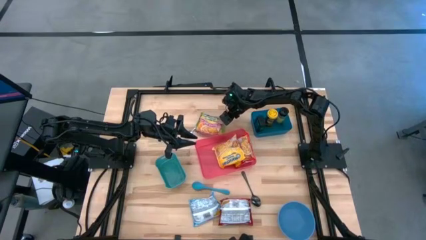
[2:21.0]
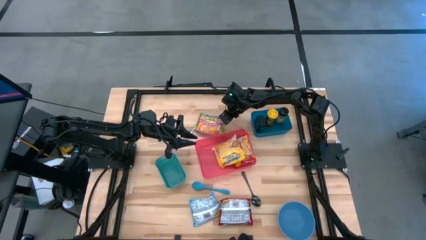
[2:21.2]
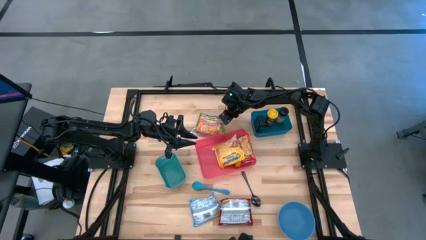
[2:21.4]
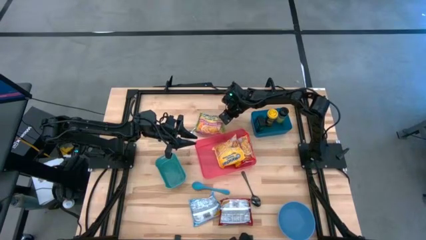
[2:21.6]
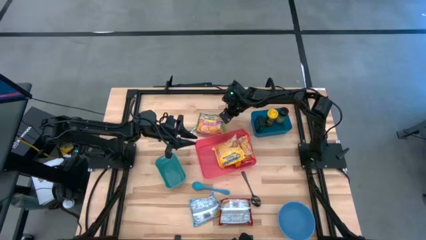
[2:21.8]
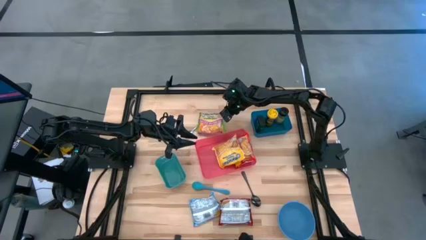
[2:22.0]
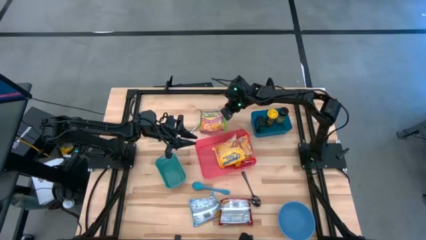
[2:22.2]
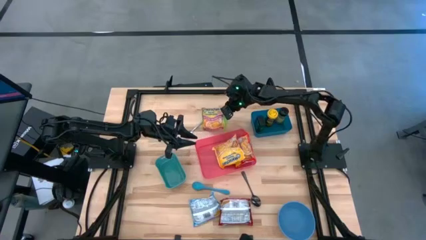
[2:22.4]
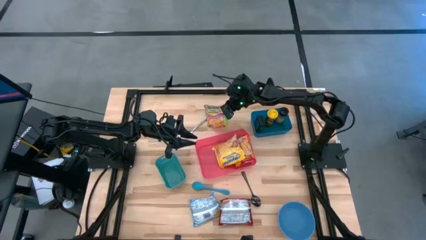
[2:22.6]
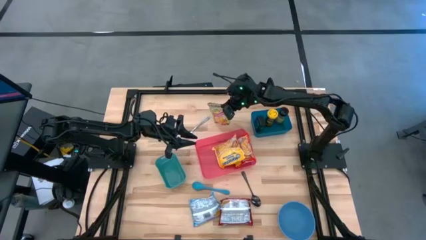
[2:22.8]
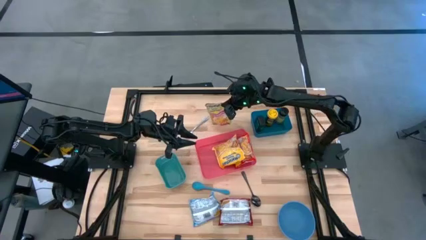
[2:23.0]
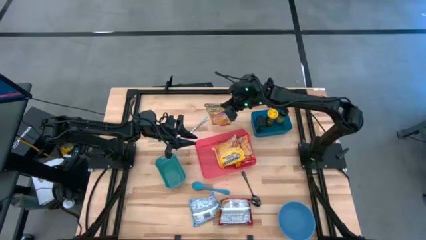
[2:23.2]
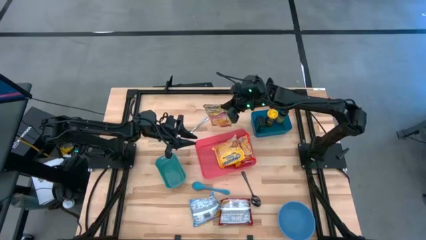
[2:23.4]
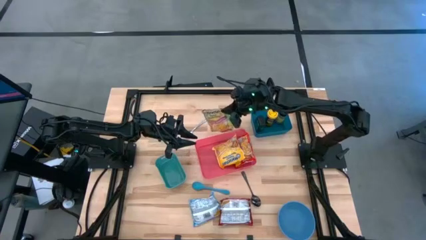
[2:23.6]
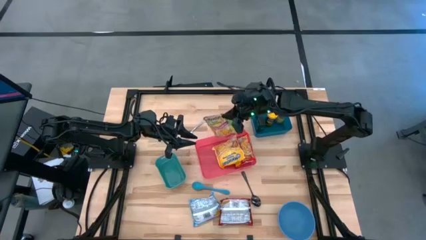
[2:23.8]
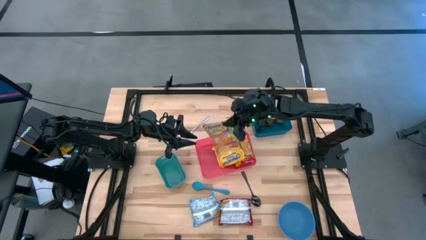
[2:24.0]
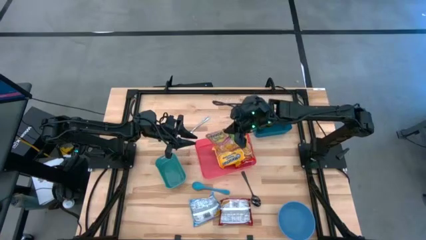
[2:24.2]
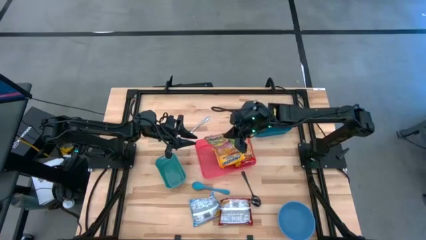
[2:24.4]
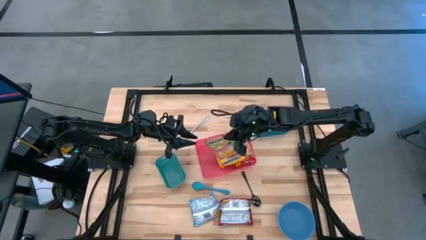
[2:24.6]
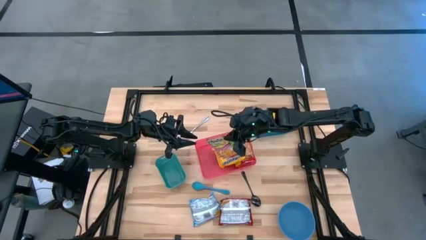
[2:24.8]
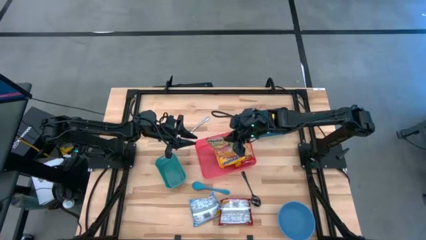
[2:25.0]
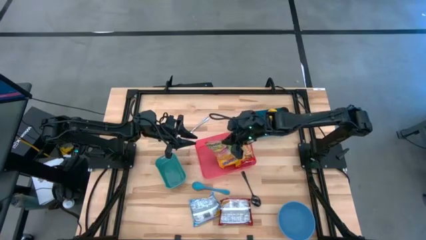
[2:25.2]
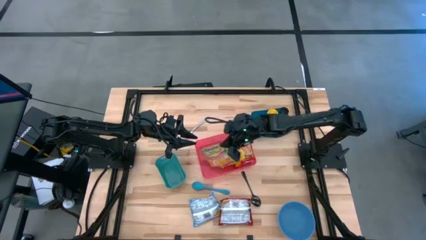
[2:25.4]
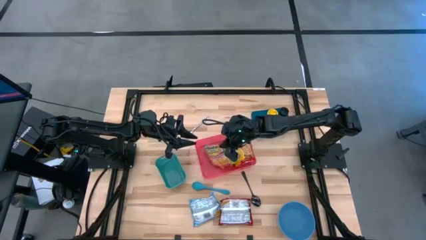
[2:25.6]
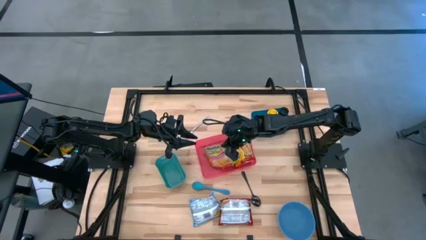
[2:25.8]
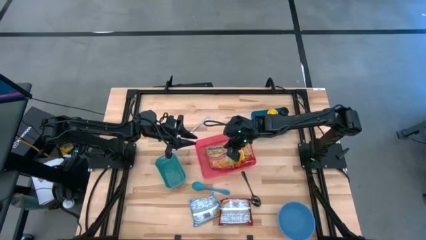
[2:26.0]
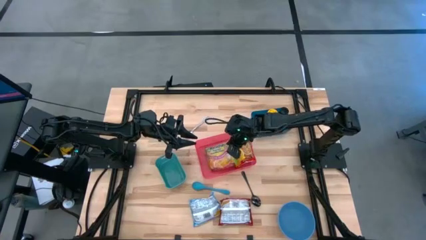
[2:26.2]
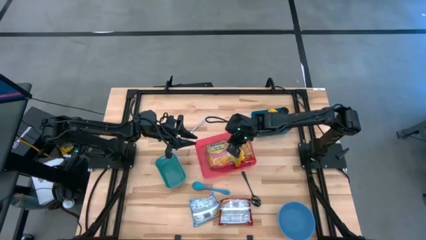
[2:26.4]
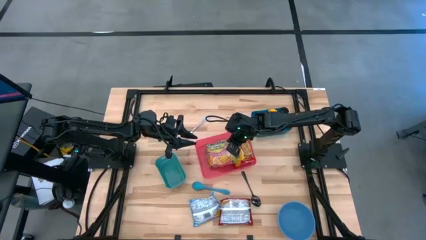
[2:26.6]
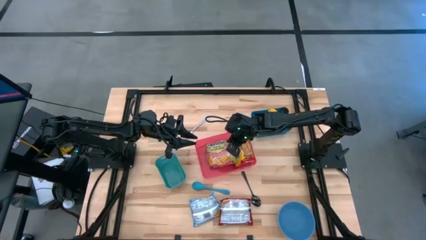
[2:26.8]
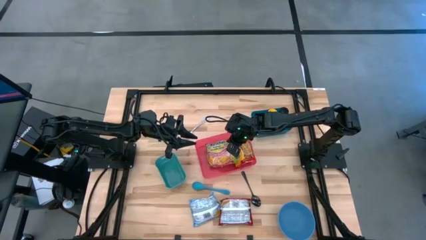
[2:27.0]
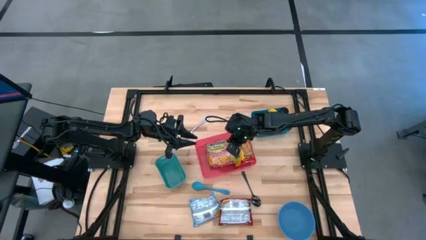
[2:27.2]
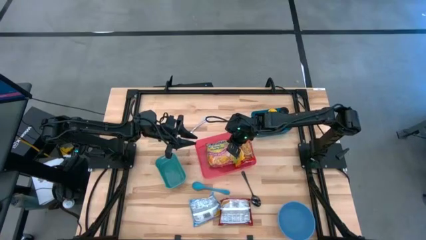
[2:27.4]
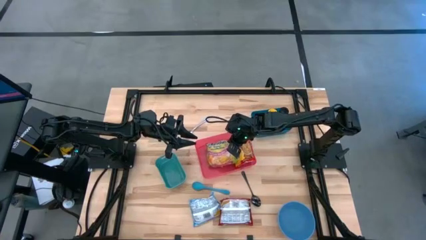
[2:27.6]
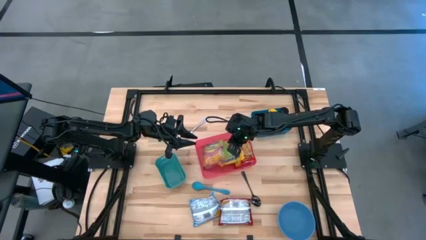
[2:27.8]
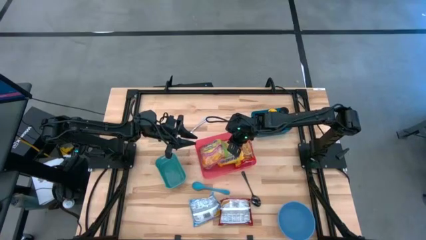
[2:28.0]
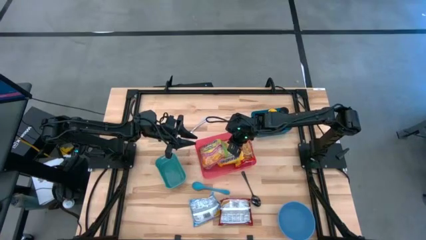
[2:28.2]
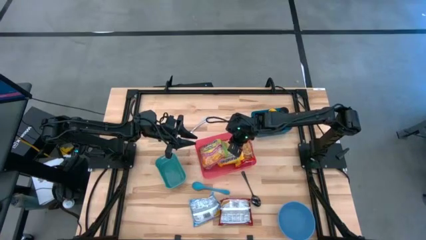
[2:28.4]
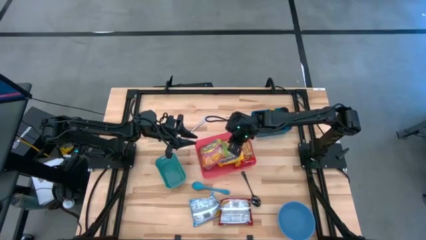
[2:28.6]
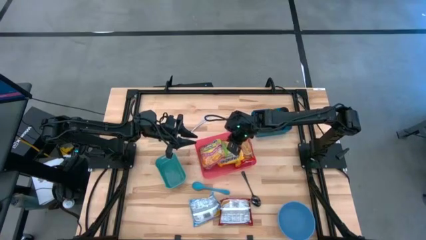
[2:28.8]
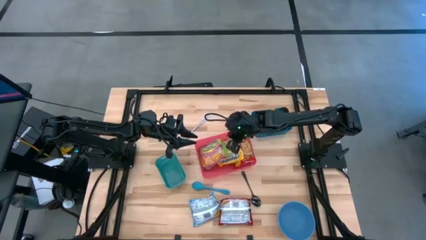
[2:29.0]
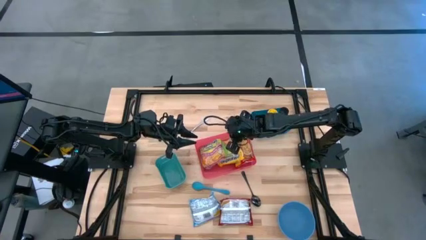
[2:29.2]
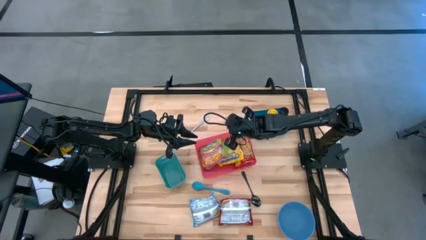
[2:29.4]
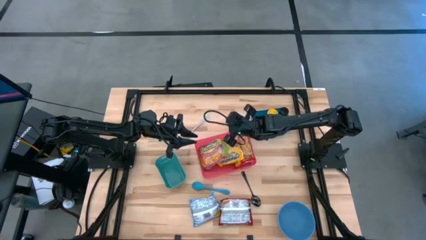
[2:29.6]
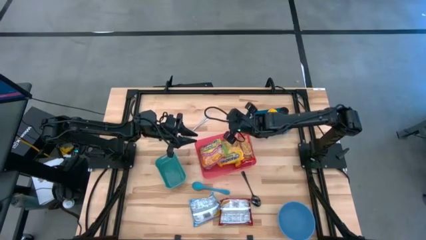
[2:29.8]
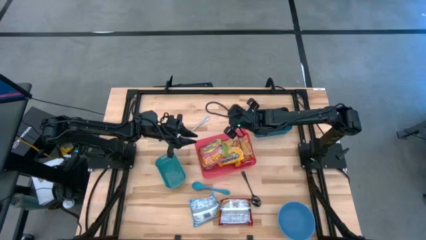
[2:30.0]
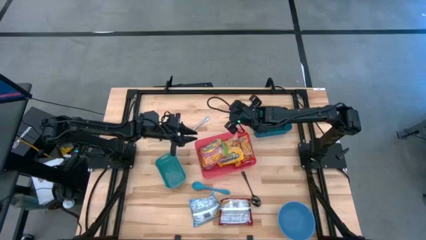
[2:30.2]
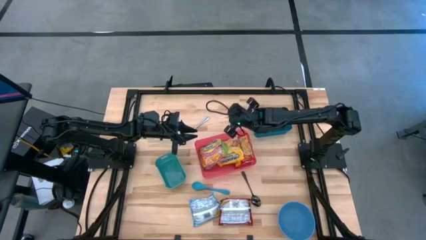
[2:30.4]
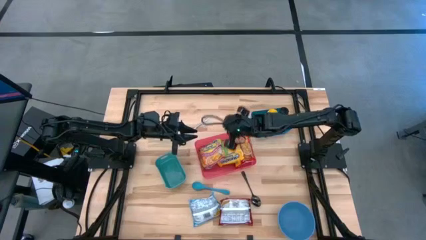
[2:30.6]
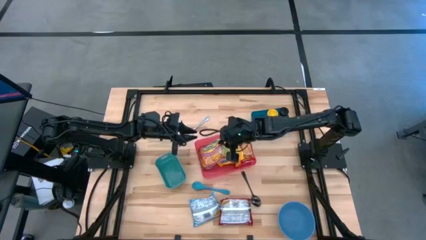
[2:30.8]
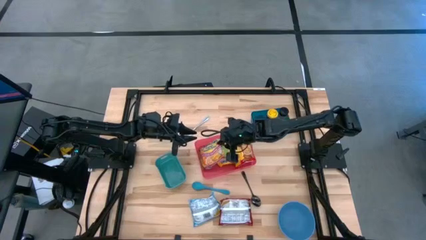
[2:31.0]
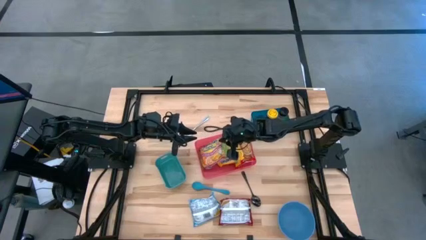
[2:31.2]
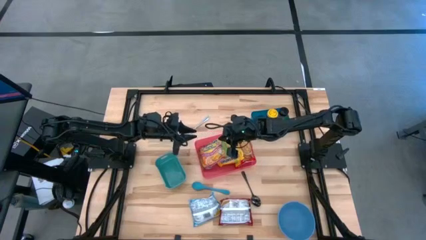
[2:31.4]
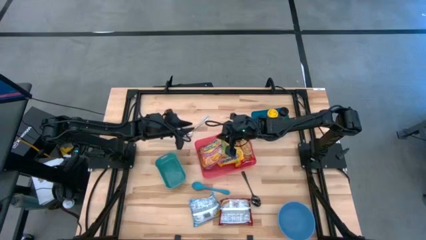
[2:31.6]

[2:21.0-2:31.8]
Task: Pick & Place Food Item
Put the green noodle pack into the red bin

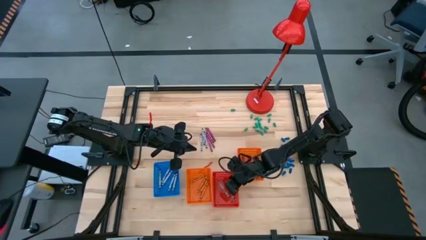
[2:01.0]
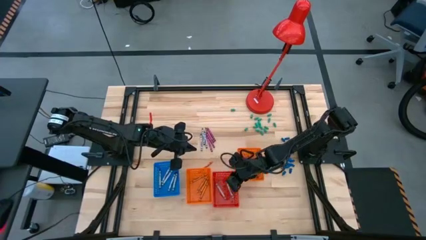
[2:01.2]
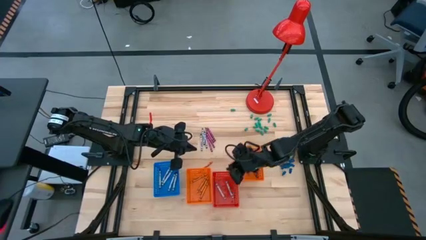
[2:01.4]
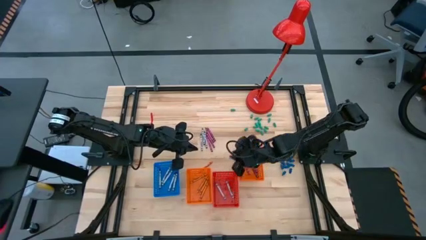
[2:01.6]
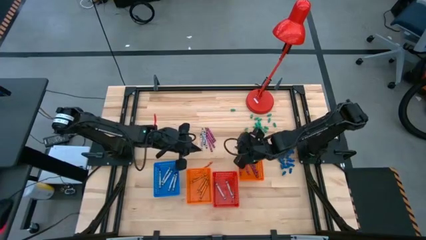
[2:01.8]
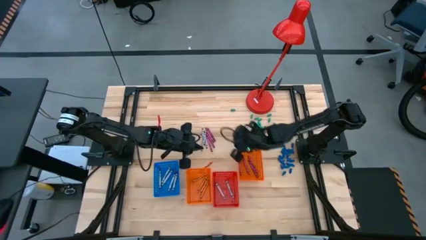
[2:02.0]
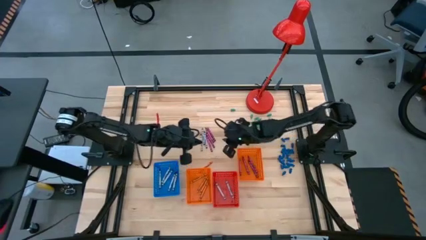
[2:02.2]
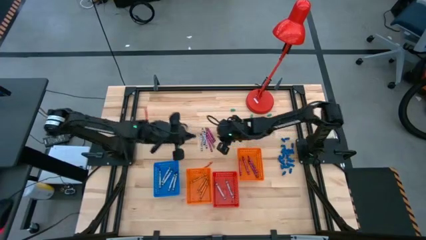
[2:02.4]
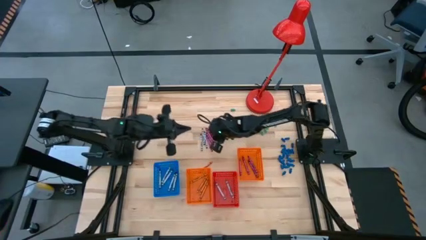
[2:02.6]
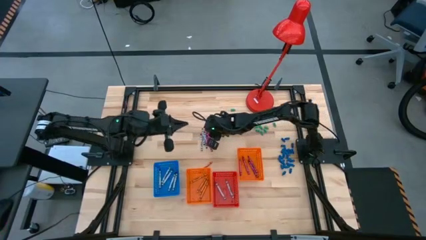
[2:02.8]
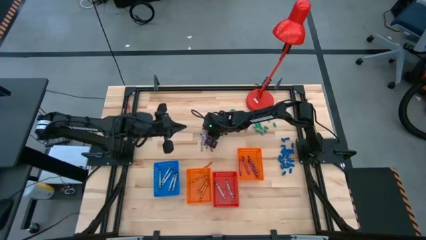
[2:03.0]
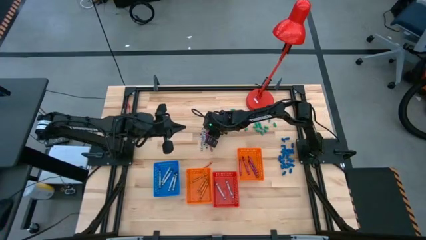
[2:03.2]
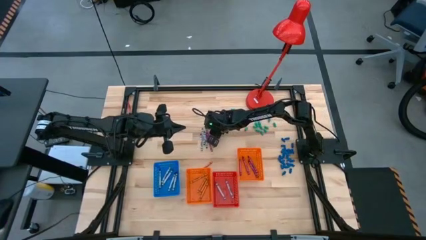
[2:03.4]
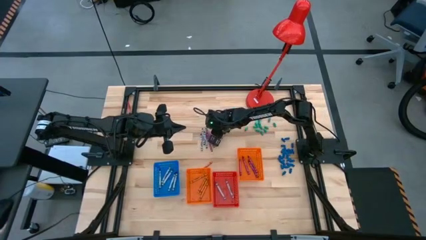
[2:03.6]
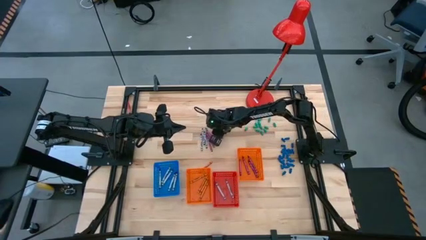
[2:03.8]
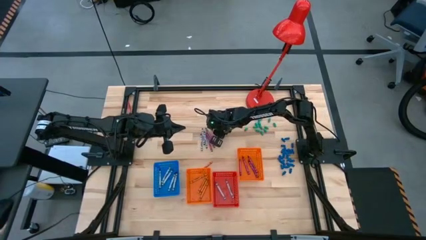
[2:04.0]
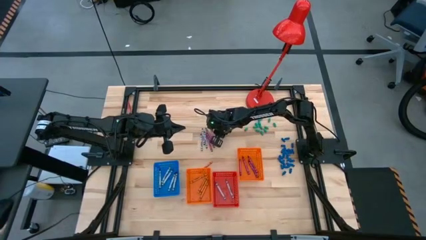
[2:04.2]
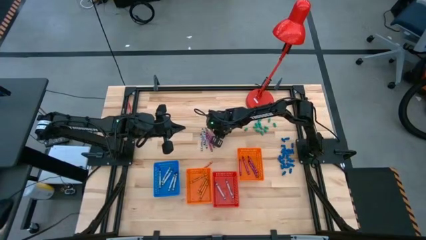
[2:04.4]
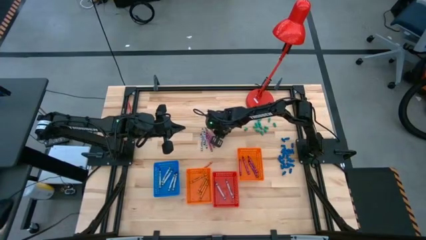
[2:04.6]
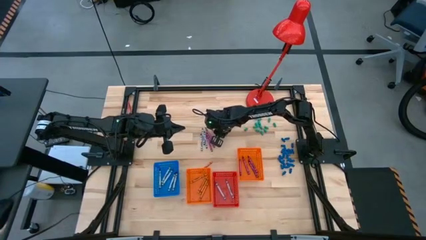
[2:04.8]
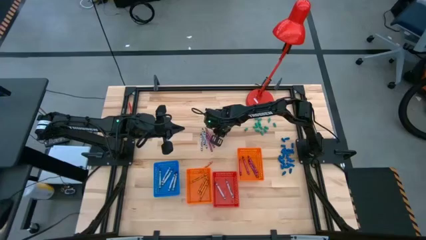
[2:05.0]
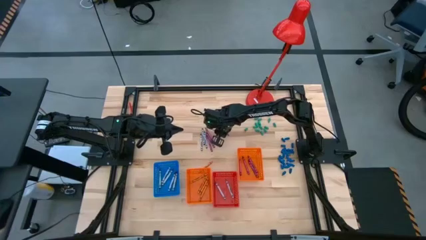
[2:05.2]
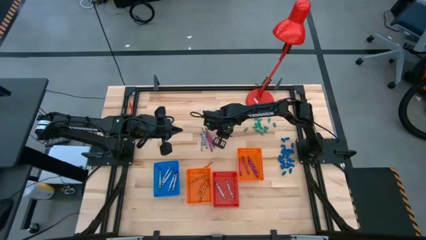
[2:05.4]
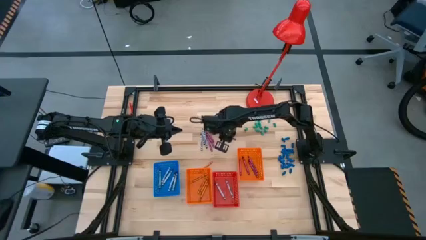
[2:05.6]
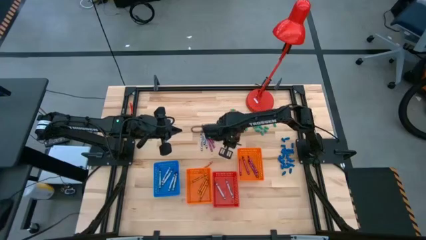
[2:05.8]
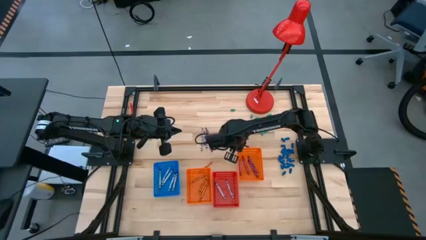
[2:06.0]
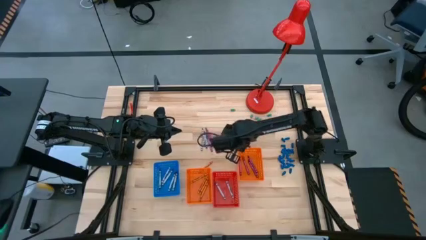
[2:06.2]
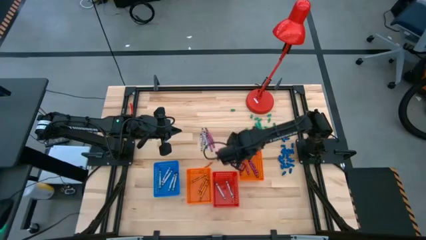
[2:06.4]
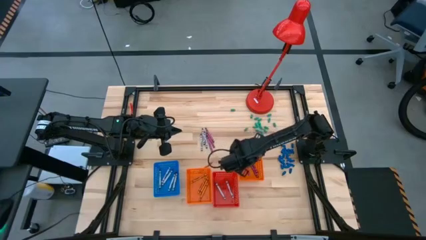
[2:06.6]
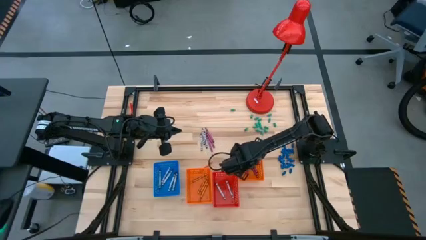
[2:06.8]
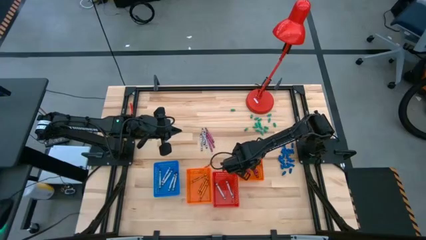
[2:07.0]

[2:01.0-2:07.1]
Task: Sort crayons
Put the red crayon into the right orange bin
